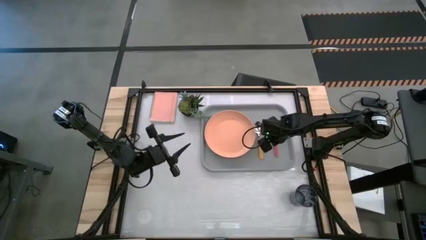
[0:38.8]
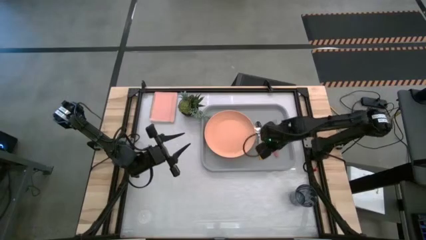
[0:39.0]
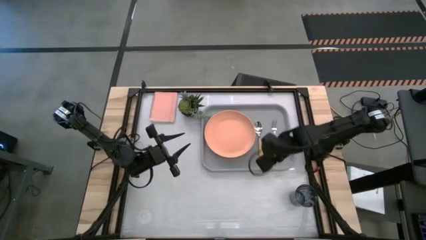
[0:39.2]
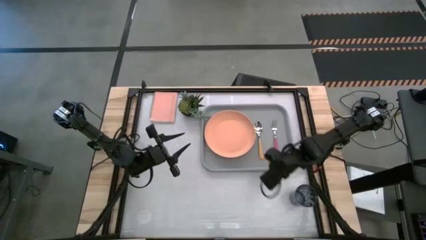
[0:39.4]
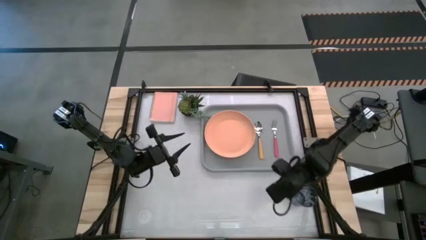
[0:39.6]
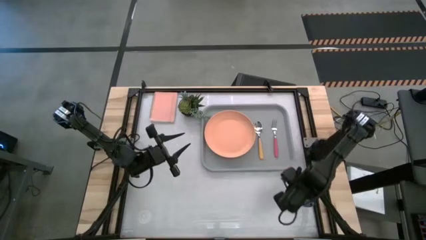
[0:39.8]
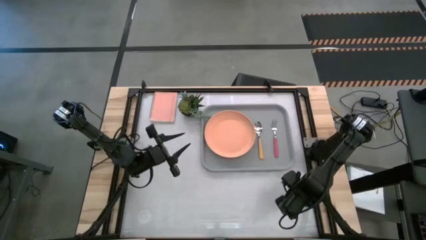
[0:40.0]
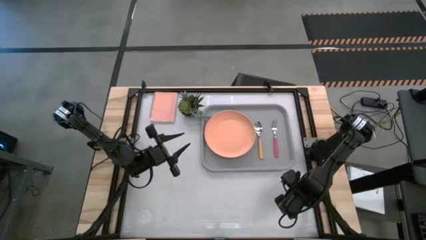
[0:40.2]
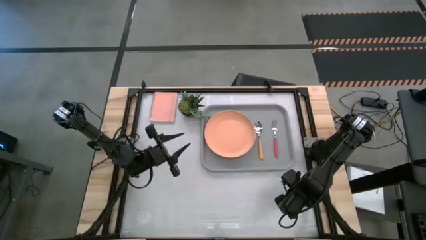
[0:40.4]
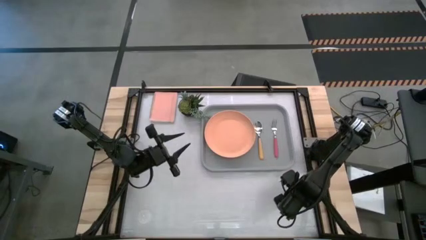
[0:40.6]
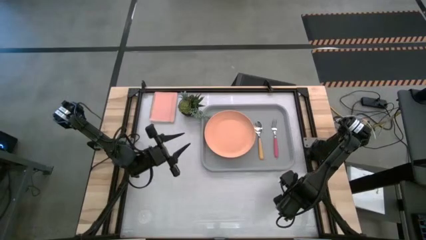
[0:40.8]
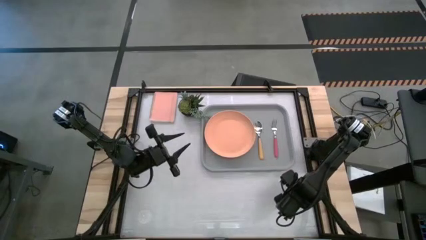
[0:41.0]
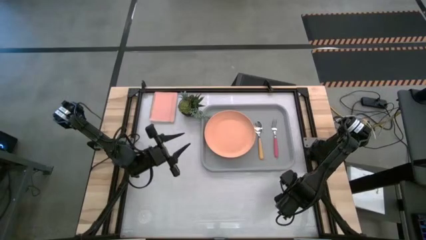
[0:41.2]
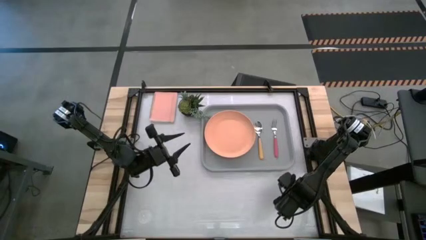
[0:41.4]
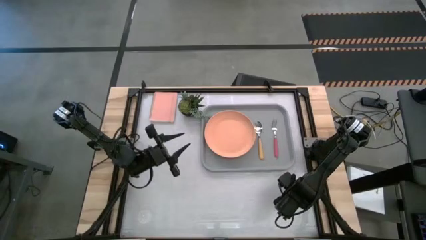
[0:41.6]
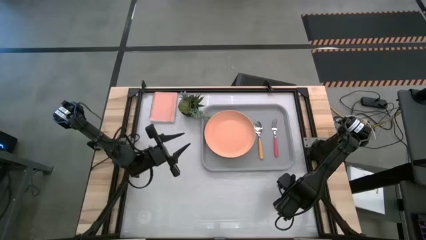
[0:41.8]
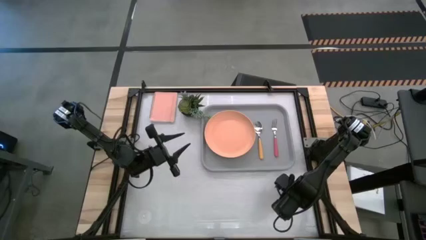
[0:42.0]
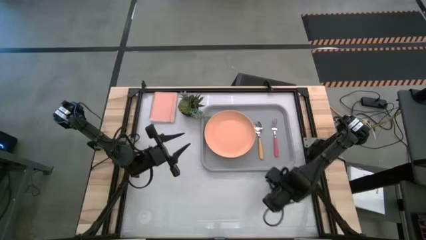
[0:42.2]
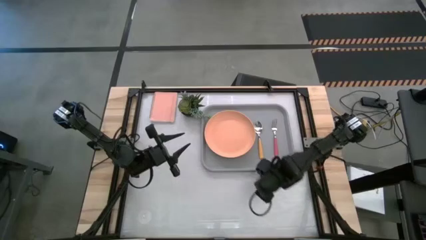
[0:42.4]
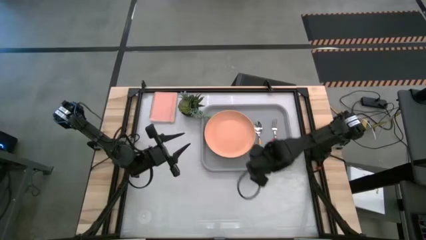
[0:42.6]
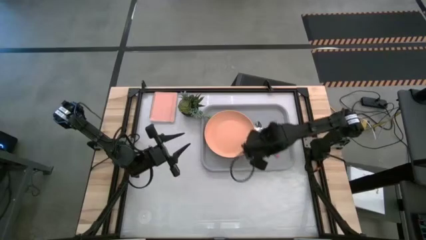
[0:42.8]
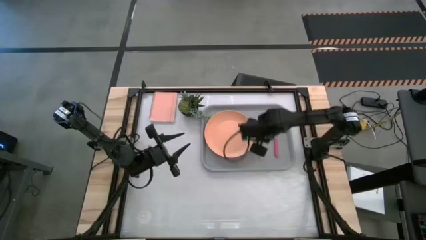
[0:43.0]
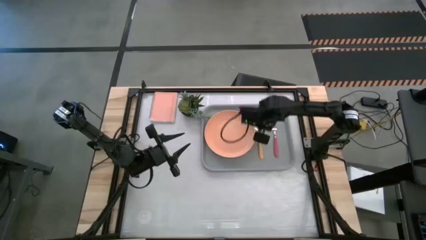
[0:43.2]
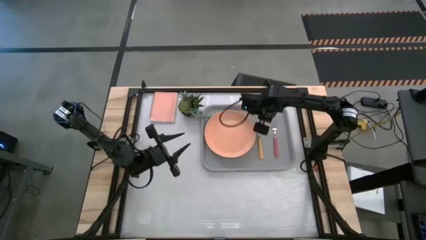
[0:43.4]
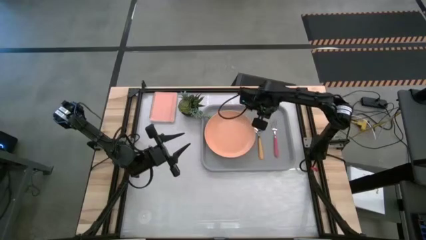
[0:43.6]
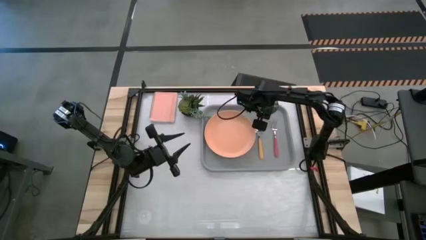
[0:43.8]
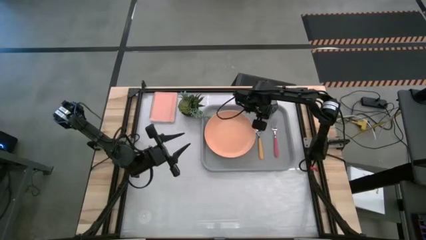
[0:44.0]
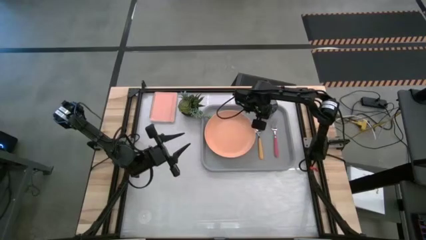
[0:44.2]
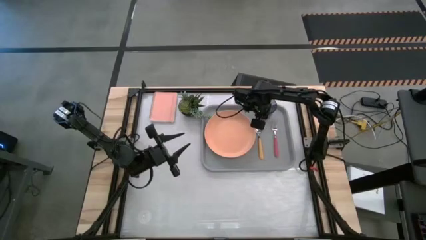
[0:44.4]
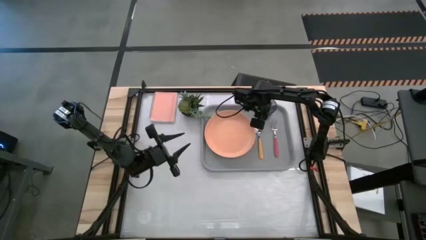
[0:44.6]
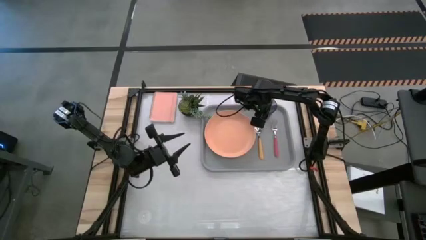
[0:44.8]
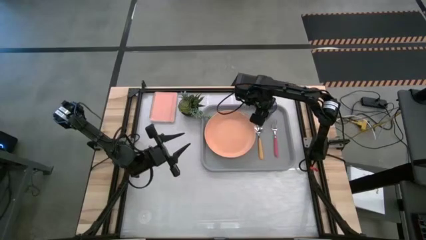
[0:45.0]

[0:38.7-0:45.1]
Task: Pick and place plate/cup/fork/spoon on tray
Put the black cup on top of the gray tray

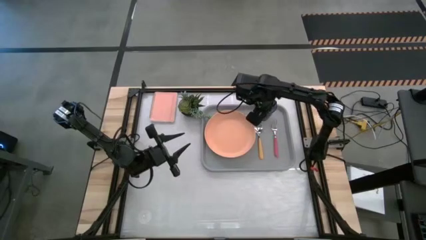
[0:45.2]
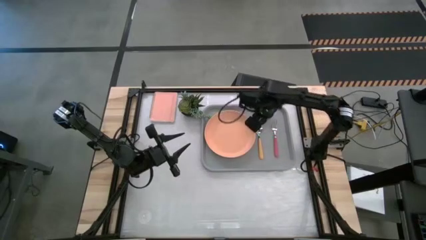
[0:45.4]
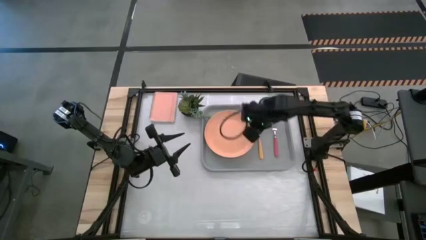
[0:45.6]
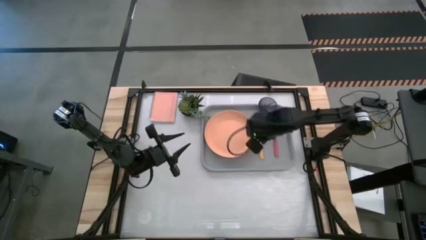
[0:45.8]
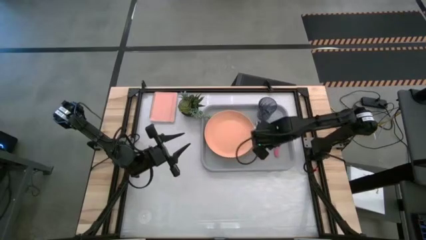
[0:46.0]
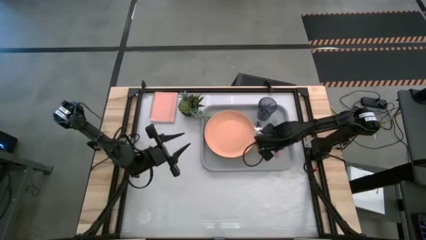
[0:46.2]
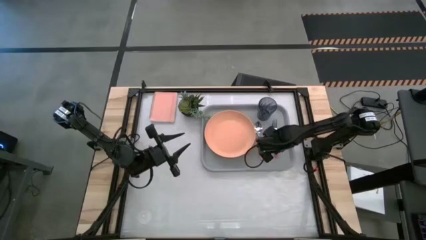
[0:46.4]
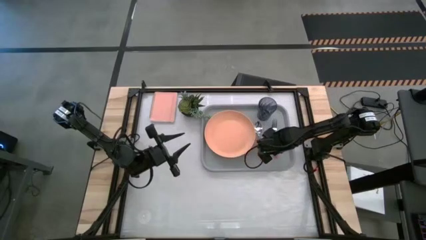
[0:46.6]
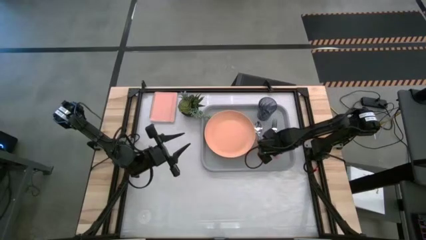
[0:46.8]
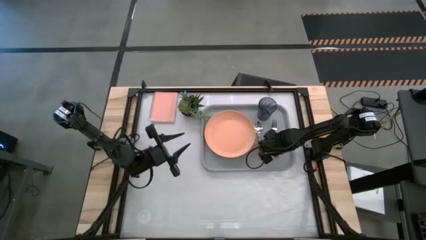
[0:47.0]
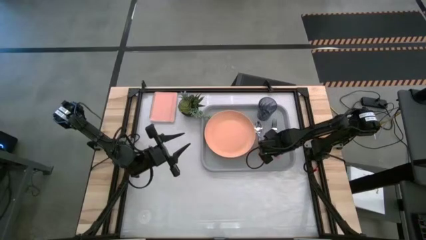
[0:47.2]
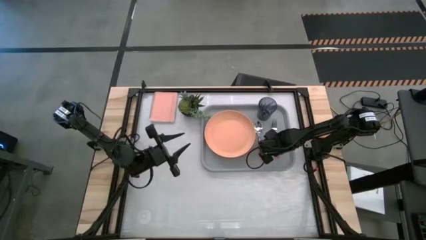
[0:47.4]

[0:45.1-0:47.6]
Adjust the fork

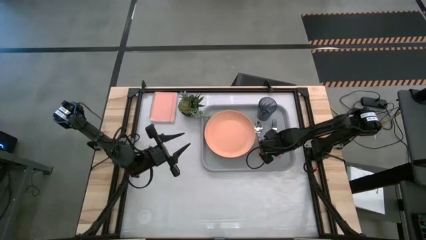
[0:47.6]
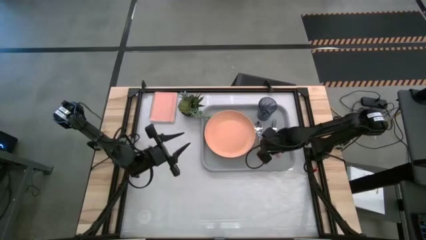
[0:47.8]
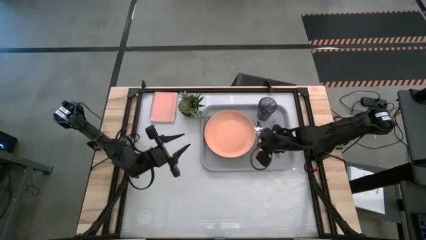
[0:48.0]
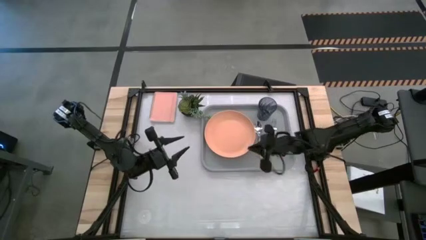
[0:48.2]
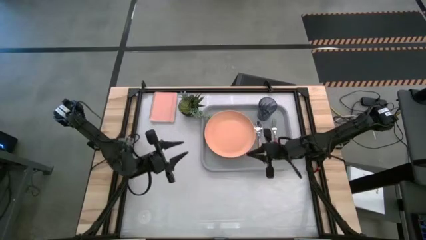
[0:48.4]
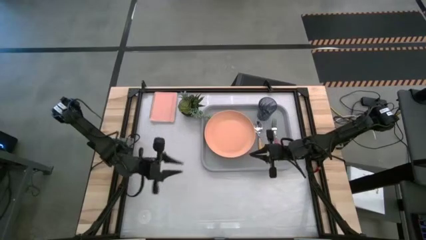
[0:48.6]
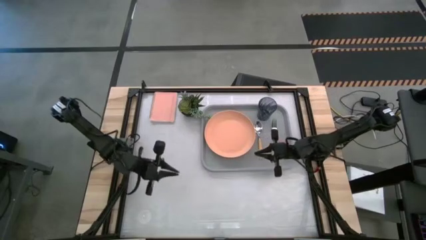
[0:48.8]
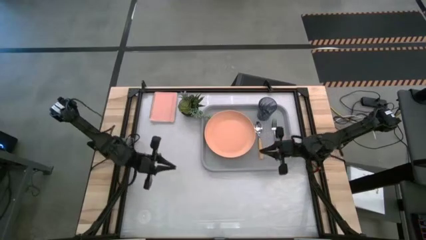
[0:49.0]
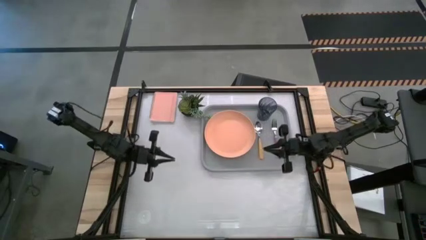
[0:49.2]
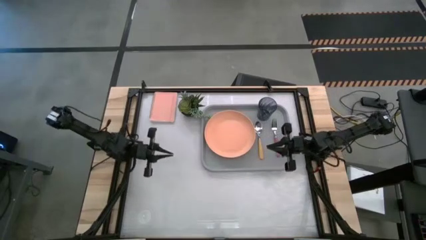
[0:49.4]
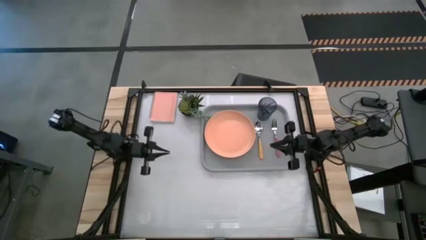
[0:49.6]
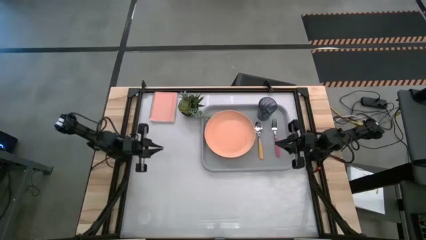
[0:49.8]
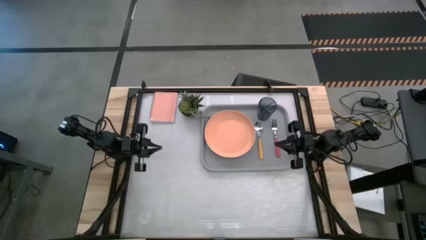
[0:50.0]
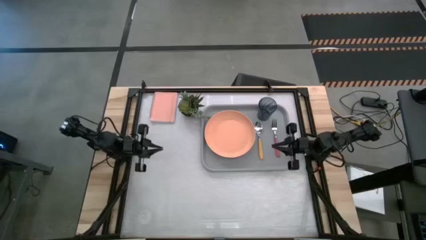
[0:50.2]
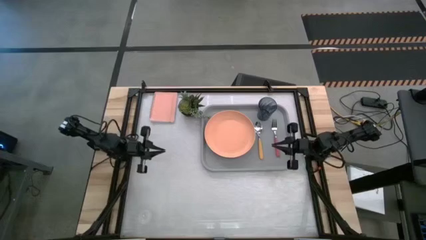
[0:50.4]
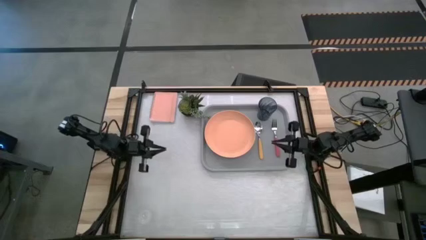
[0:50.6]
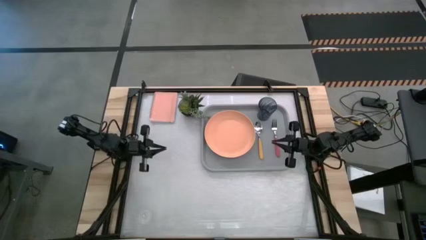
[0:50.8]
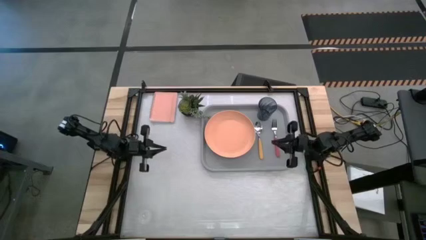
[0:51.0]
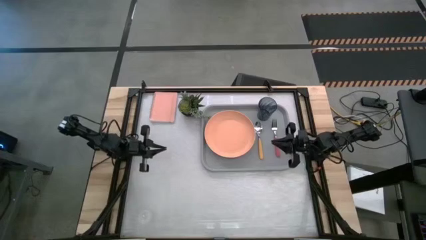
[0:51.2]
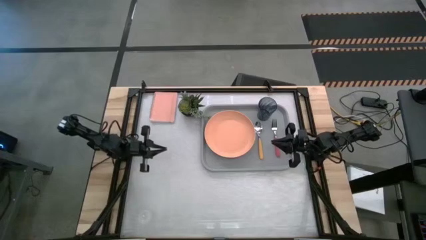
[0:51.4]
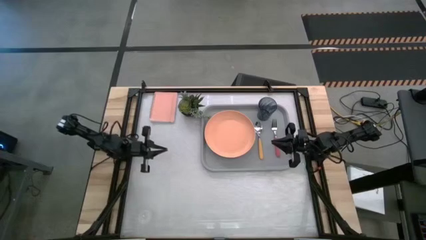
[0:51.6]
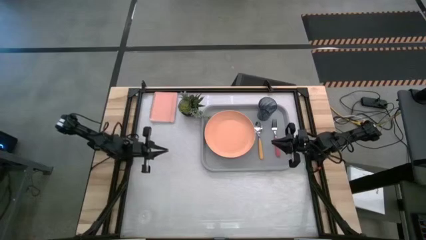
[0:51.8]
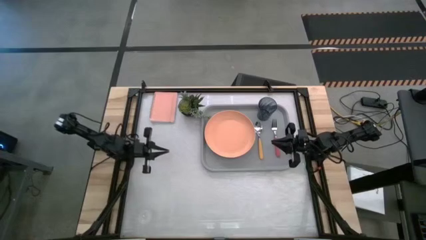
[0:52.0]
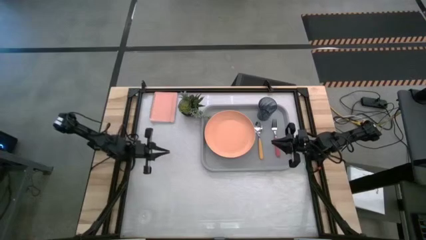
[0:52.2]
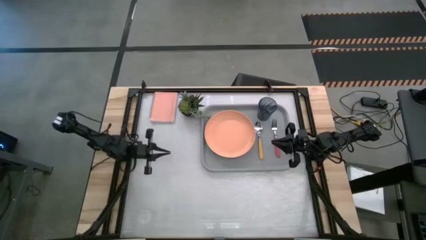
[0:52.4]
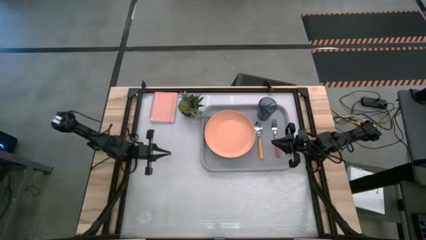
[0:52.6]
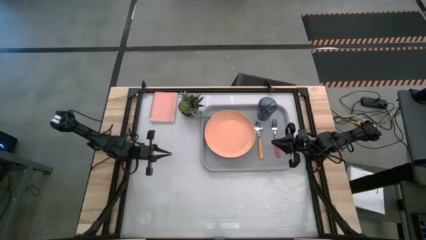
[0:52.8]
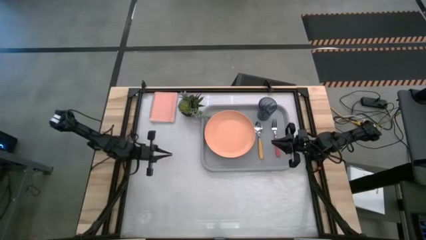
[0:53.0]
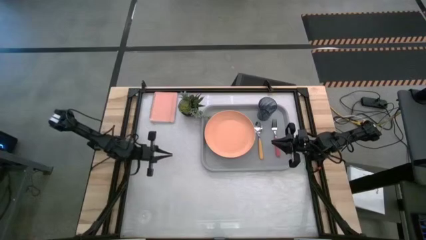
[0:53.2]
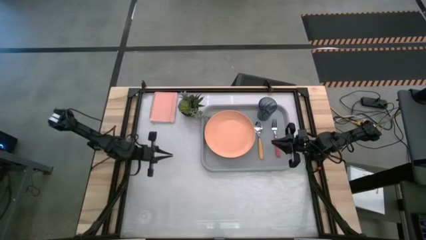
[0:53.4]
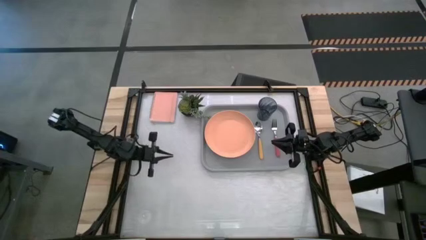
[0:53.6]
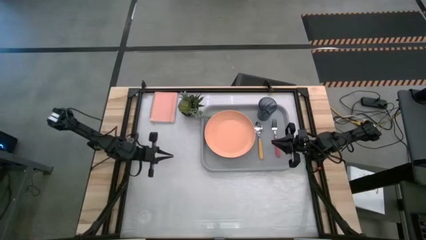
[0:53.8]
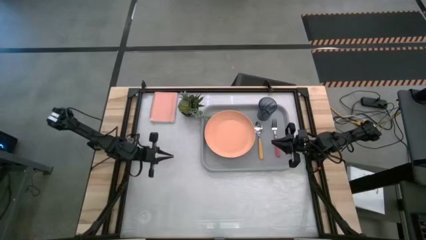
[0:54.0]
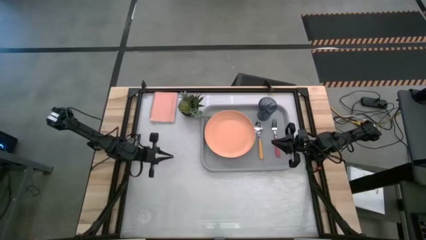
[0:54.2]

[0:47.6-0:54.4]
Return to Home Position

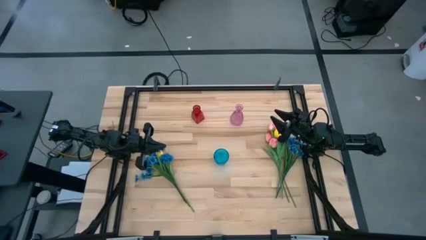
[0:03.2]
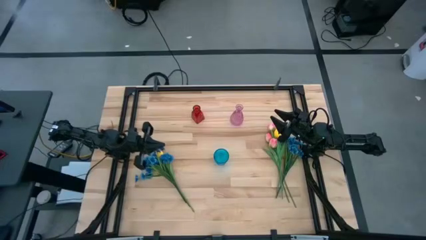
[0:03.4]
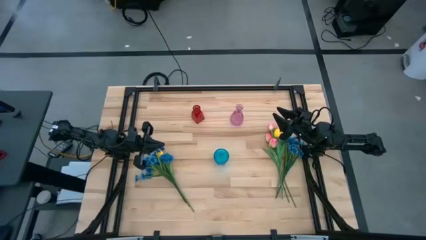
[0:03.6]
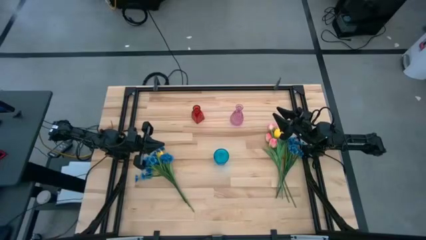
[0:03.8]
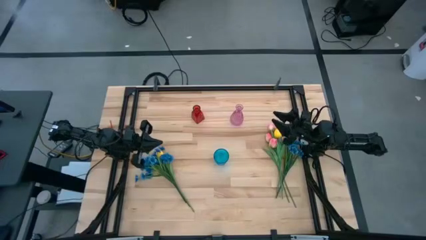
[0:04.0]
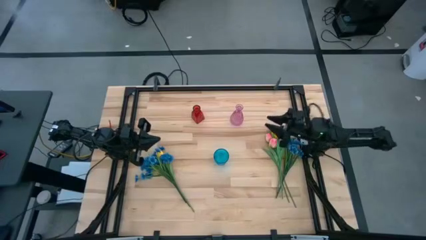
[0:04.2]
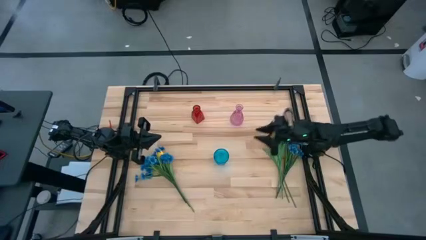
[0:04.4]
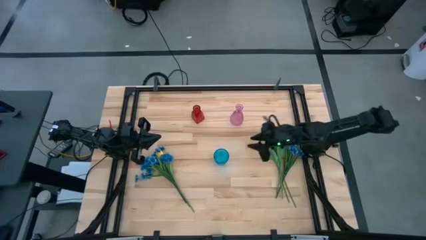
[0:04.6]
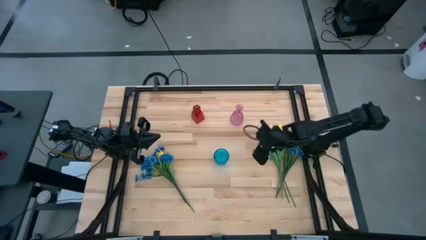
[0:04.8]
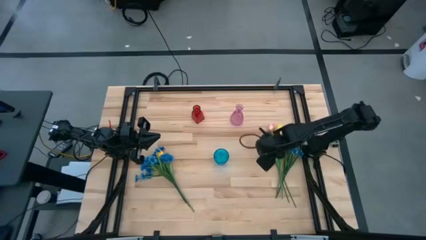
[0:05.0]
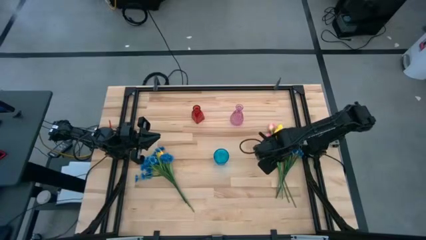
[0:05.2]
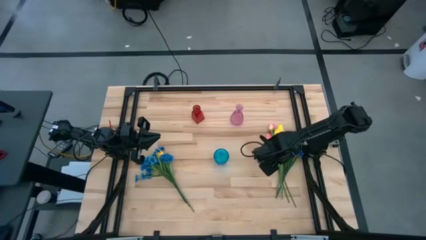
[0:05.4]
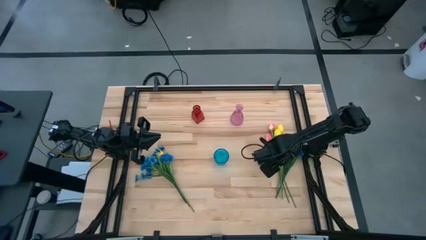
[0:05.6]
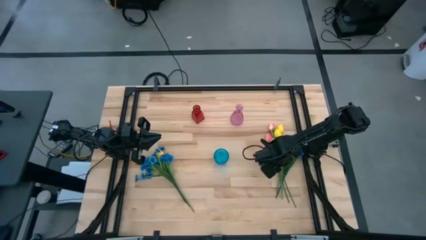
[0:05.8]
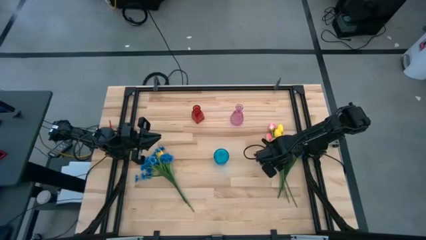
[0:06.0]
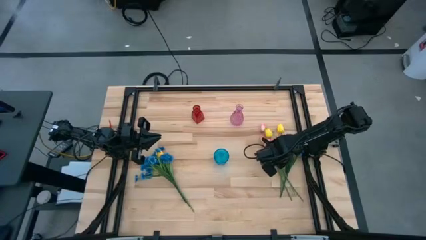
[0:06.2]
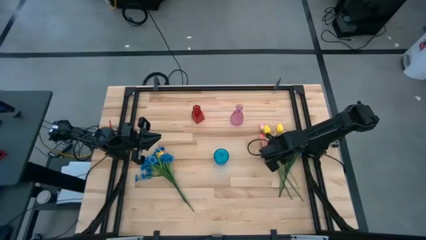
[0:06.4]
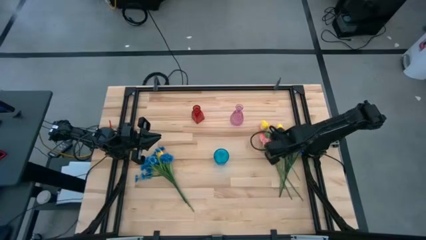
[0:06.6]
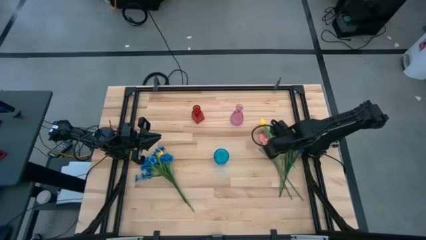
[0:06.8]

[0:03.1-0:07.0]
Task: Sort flowers into vase by color
Put the top left yellow flower into the blue vase
